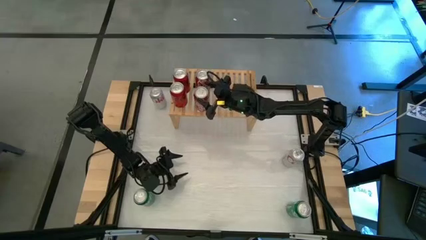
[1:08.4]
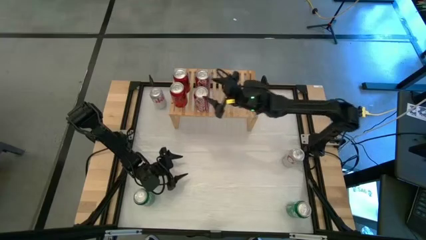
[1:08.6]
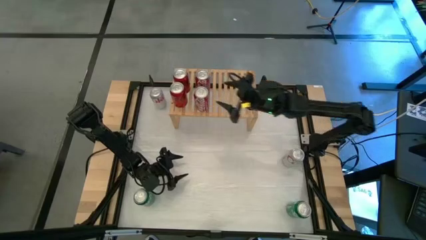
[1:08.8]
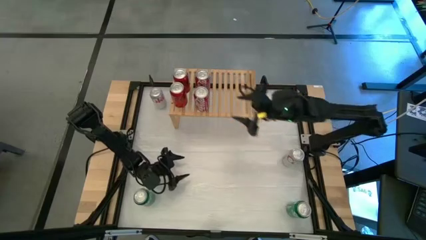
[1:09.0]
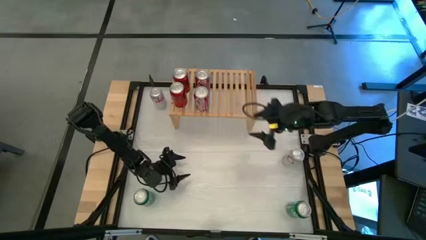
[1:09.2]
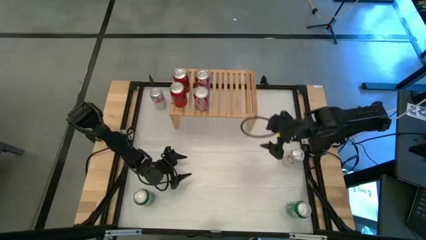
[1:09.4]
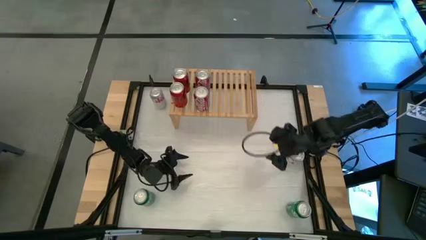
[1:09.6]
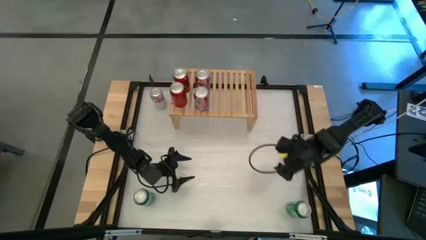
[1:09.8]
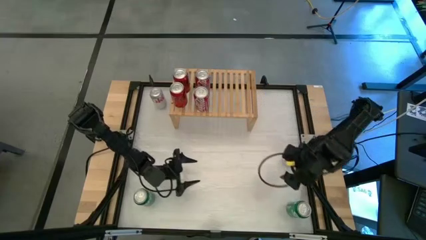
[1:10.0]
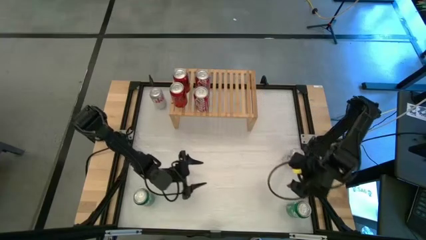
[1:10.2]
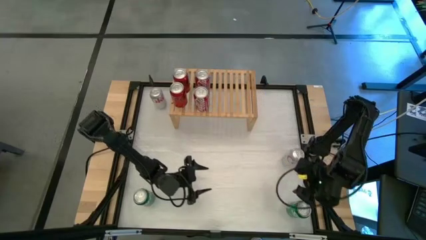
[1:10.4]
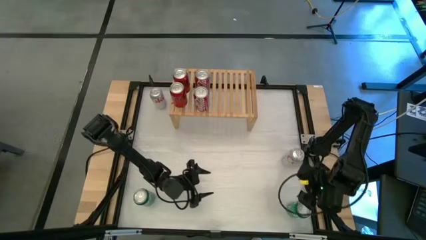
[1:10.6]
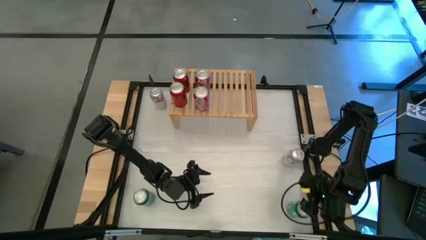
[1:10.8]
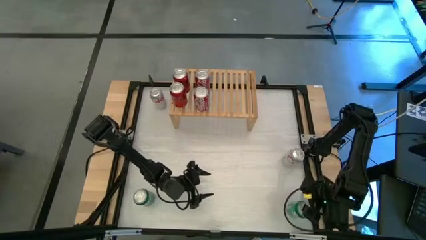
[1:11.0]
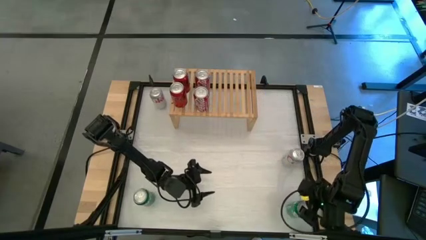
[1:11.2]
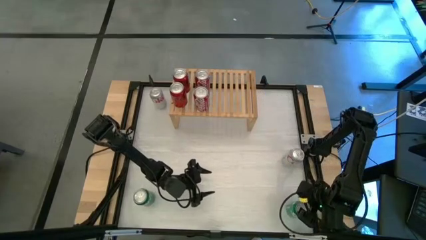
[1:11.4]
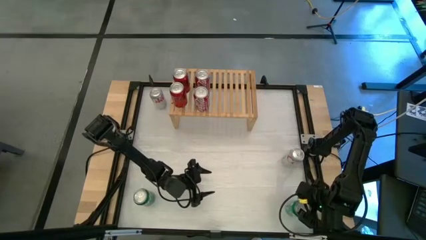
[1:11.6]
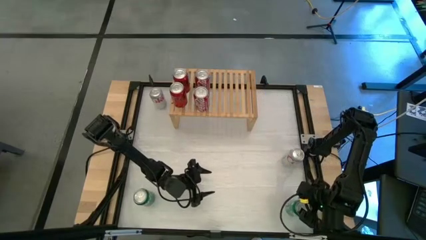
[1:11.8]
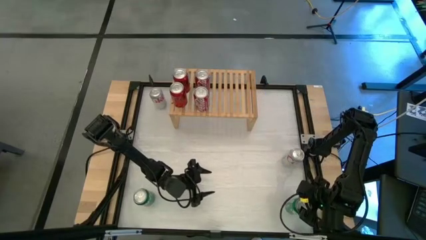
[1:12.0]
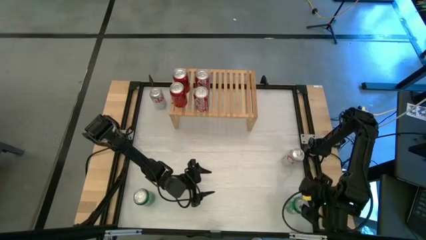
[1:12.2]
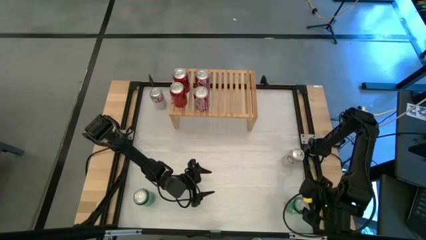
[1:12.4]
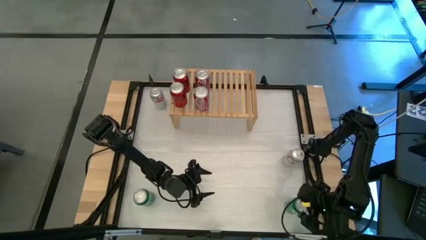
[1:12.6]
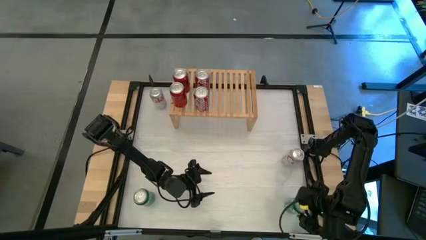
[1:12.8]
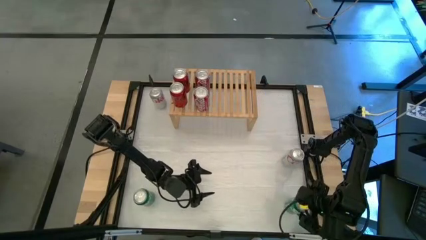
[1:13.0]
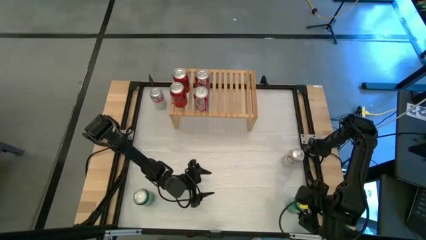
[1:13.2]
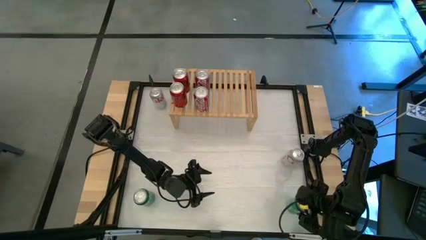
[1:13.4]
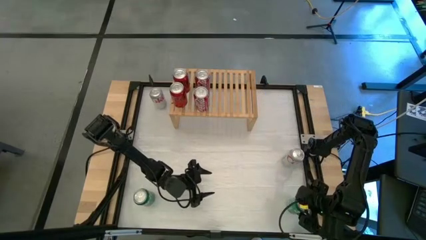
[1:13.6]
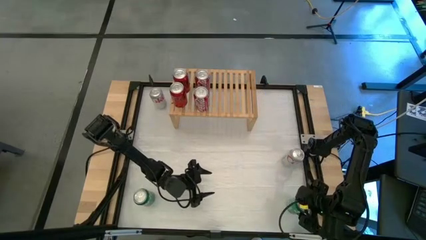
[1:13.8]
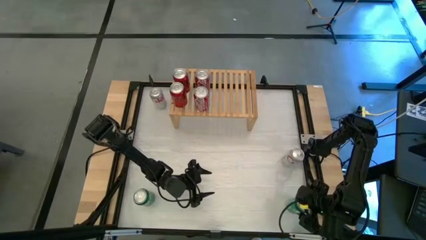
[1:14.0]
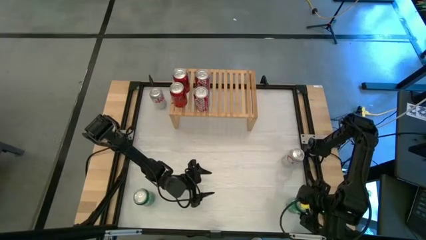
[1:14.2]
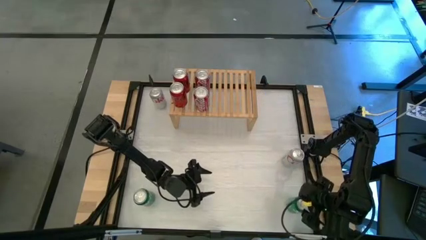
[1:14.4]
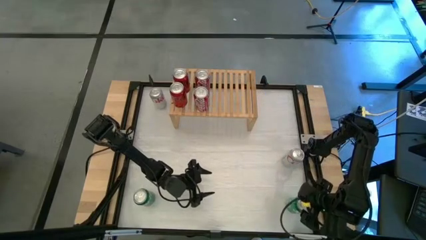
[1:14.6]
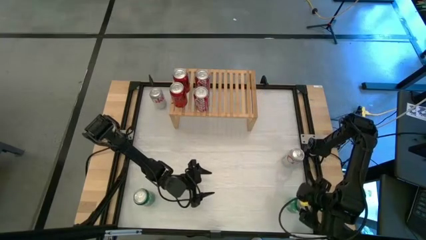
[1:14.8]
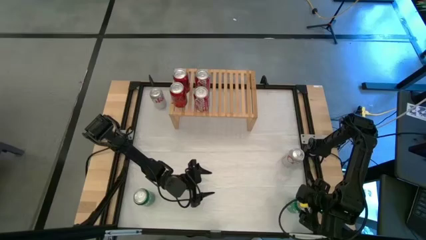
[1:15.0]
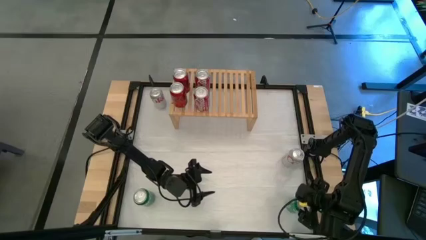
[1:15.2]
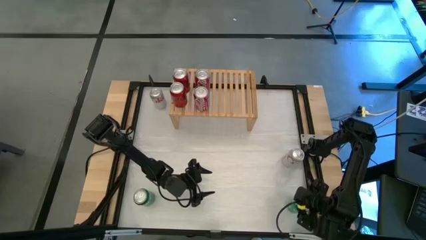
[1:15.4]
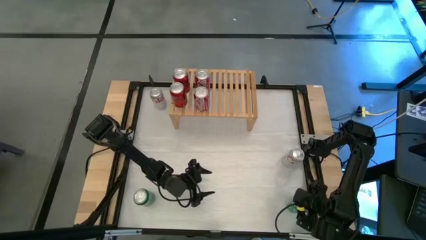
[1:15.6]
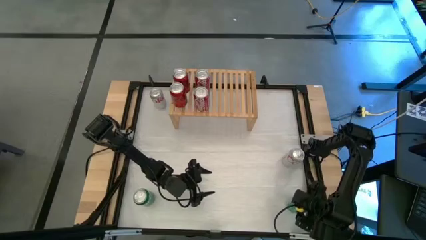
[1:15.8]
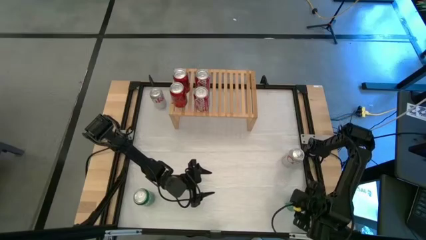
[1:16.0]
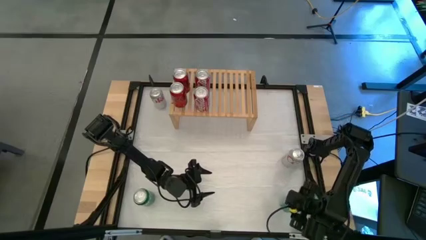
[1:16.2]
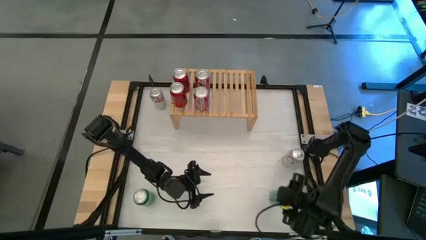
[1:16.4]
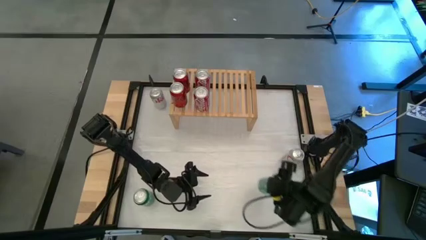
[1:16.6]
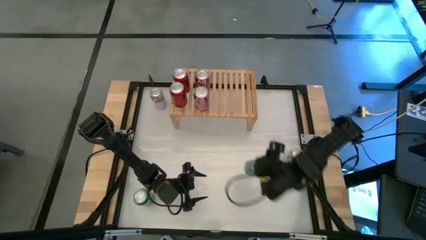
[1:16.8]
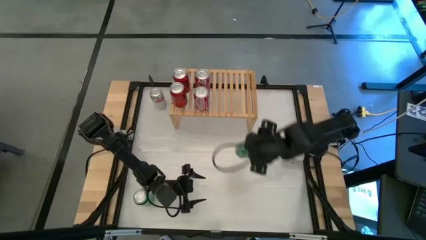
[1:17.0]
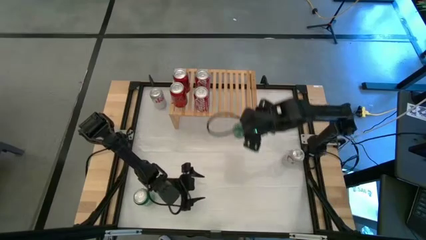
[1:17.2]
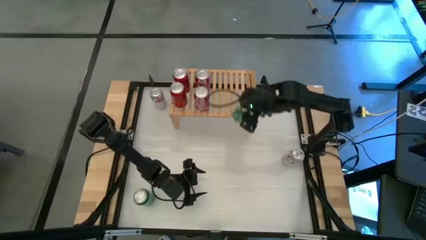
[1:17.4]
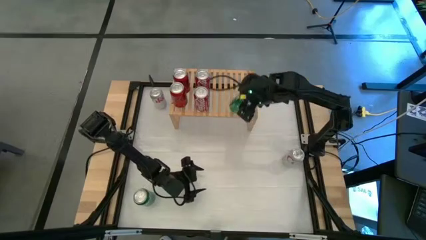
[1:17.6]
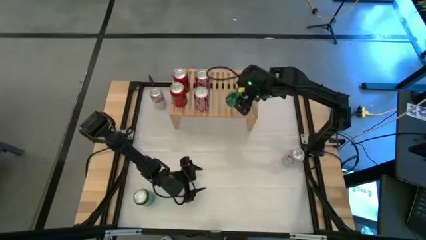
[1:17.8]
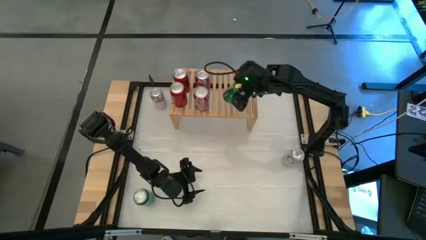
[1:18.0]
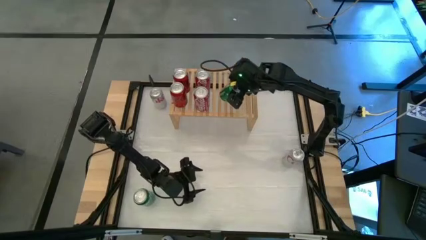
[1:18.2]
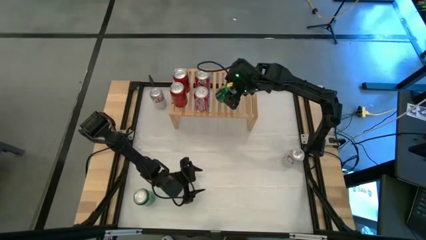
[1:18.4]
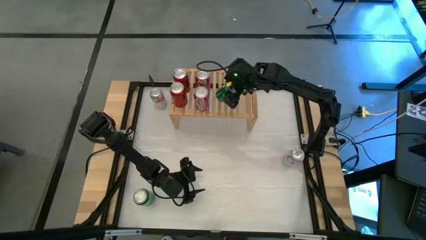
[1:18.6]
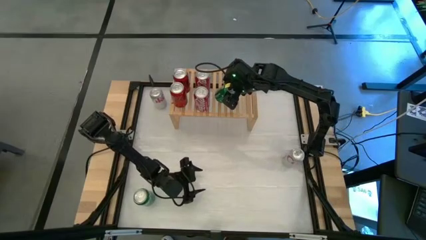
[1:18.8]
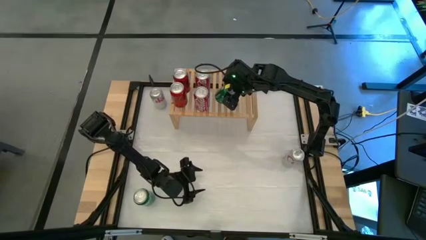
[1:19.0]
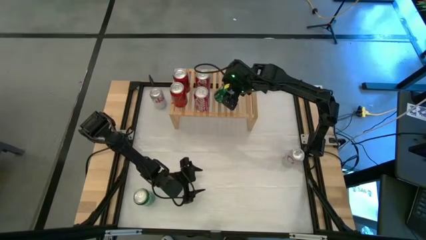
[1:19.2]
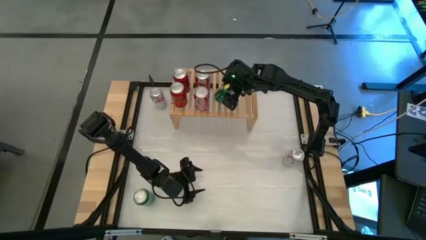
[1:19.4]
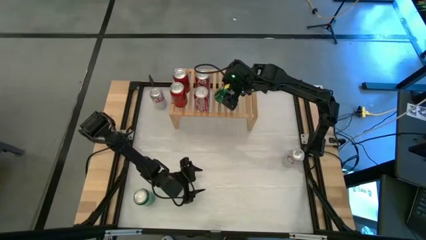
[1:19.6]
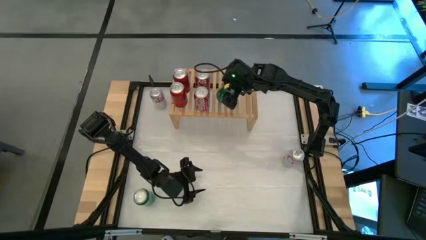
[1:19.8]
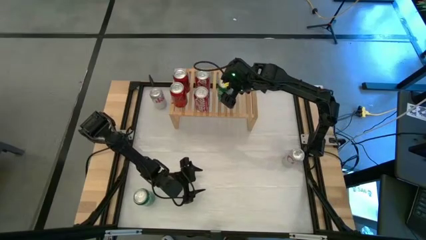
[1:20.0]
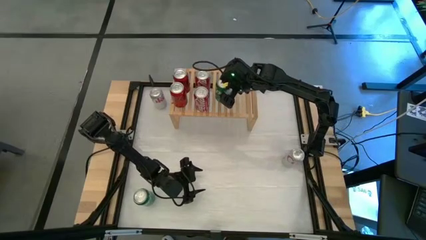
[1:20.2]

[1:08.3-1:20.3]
Task: Place canned beverage on shelf
Put the right green soda can on the shelf

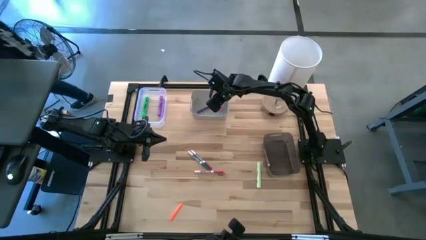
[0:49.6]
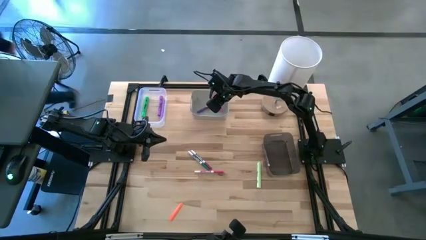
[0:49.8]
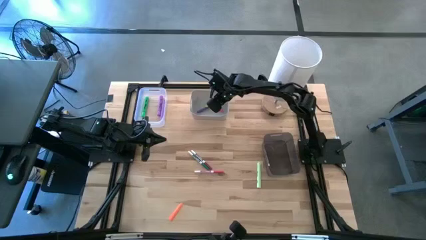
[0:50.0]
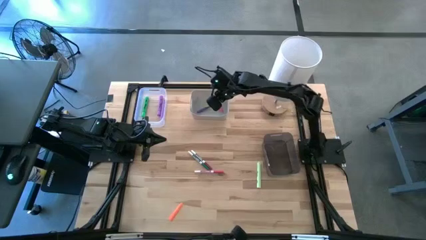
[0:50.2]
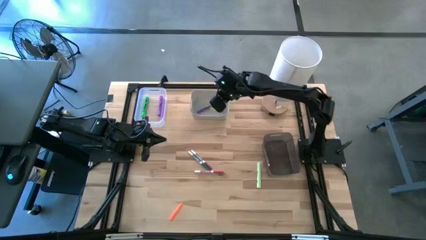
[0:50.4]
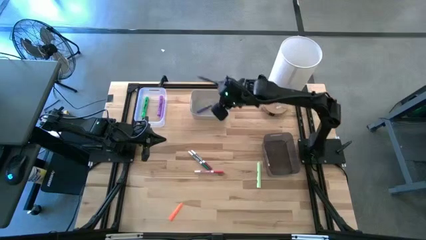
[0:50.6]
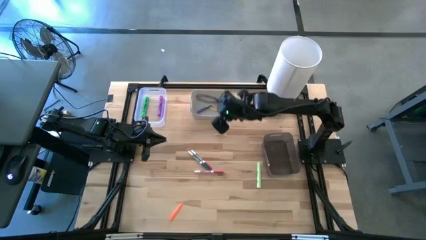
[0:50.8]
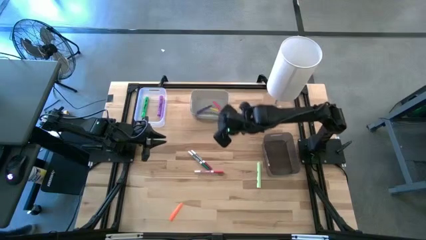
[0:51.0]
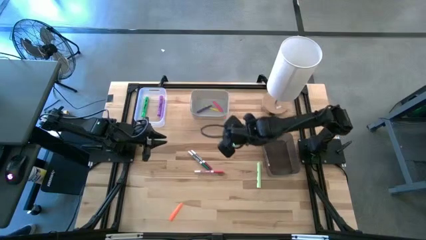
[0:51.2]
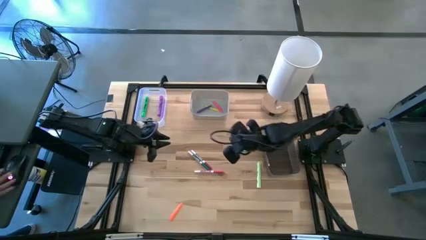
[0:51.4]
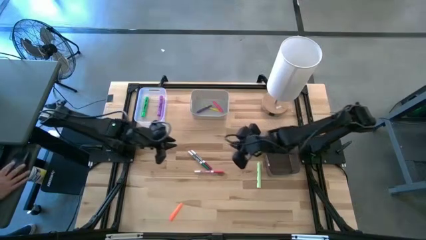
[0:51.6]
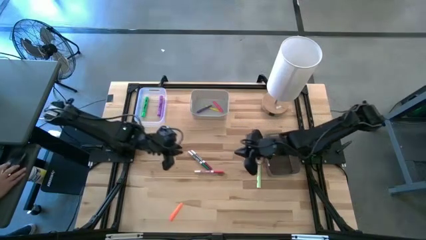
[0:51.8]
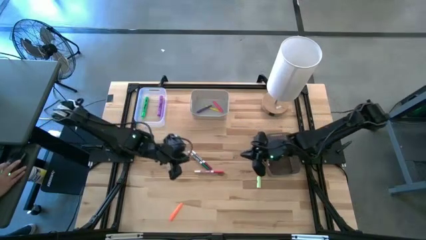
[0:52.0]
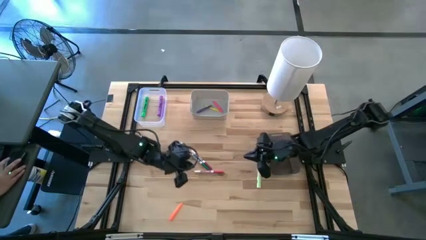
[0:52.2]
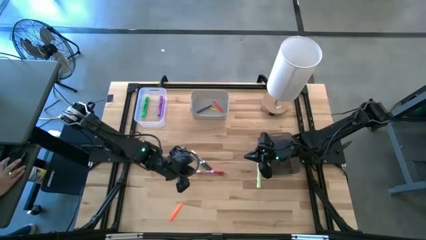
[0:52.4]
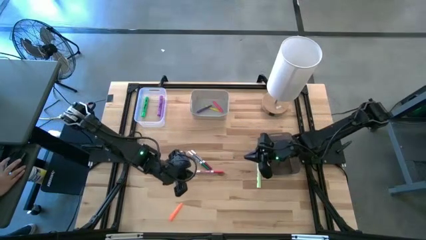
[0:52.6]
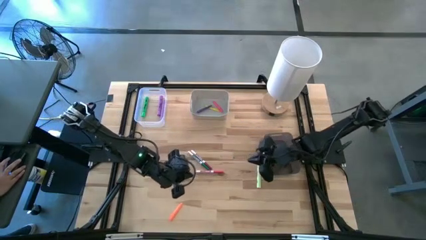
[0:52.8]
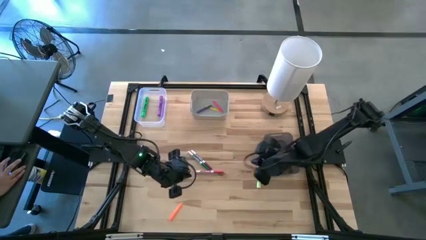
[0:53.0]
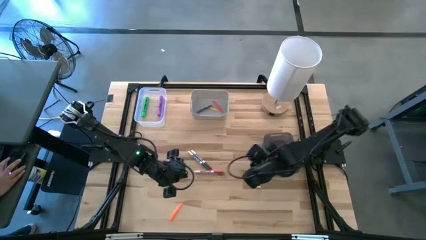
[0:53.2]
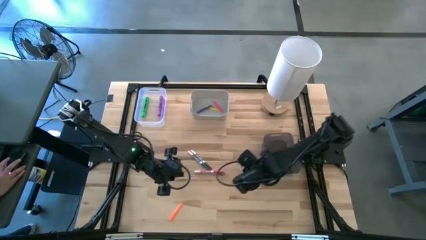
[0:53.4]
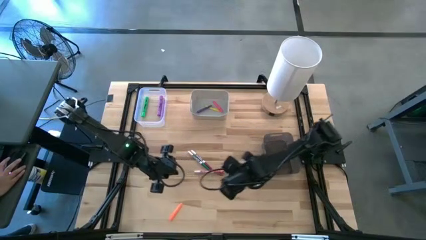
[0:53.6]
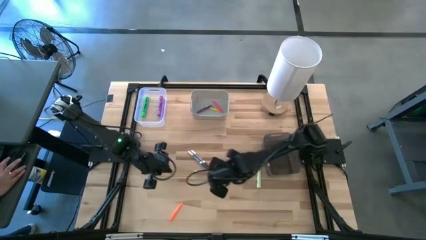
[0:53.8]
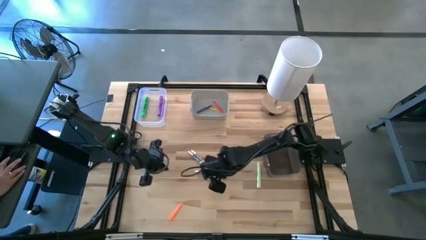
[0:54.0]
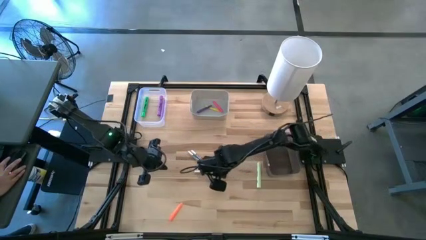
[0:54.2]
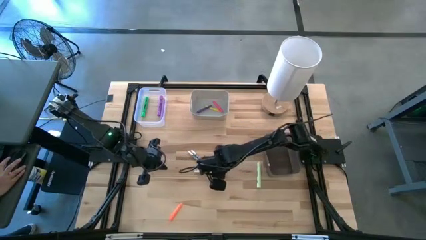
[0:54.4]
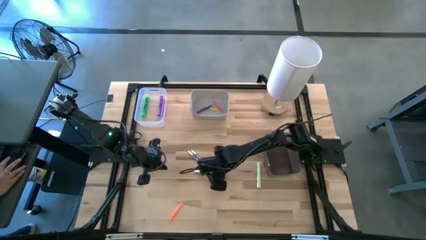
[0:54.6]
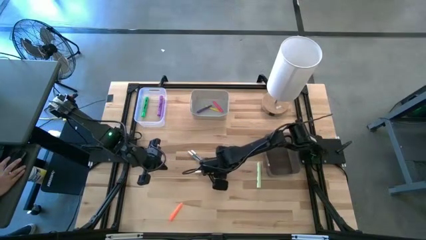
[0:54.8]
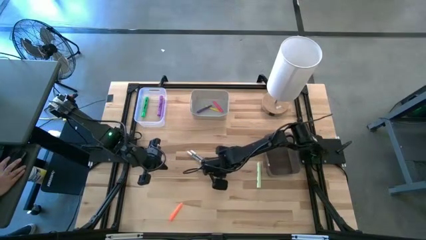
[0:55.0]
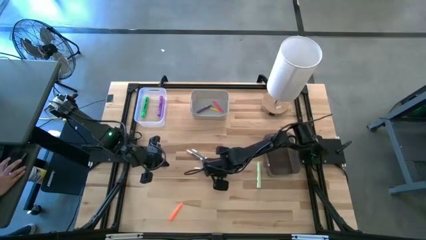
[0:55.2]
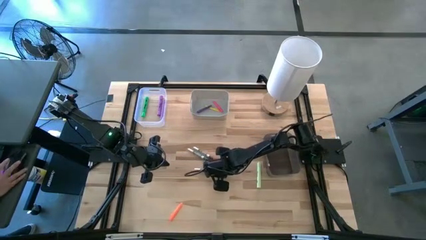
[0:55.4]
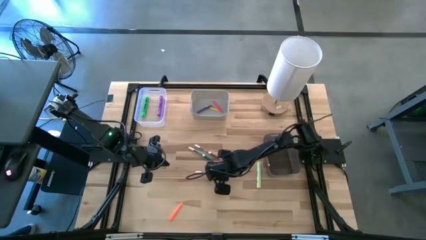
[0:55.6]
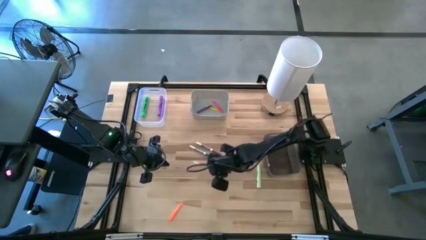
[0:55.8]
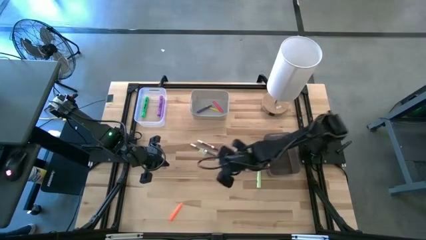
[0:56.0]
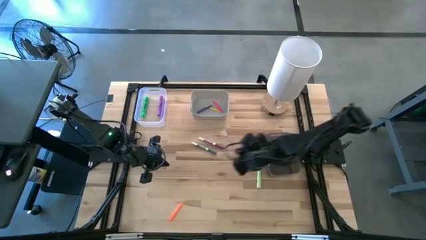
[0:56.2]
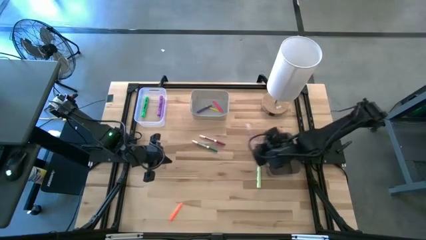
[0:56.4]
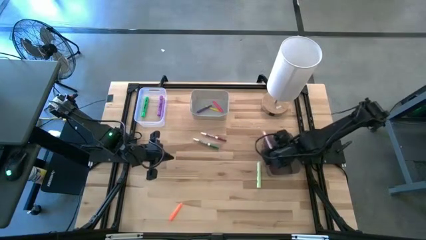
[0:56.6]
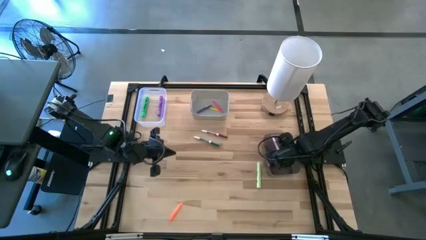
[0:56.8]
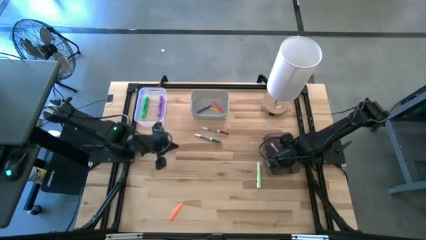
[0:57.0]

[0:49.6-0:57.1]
Task: Pick & Place Markers
Put the pink marker into the black bin
